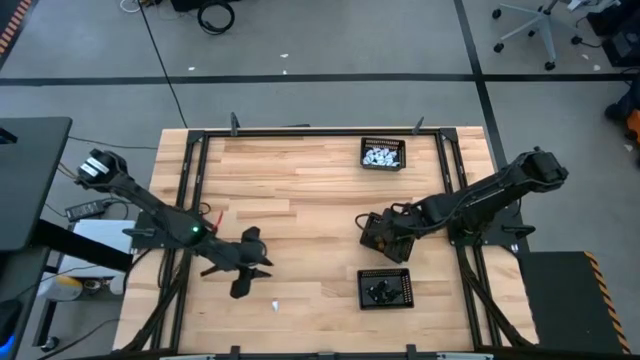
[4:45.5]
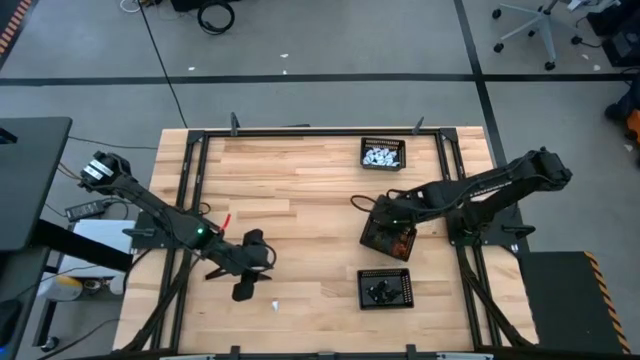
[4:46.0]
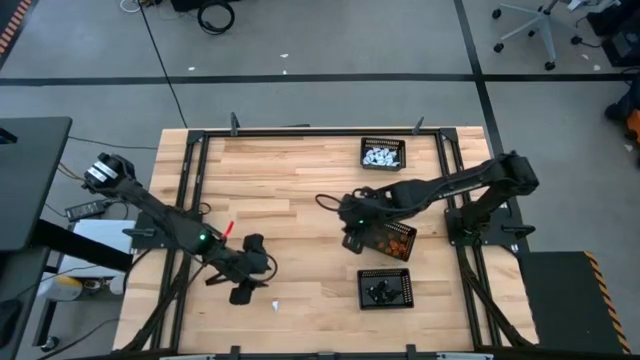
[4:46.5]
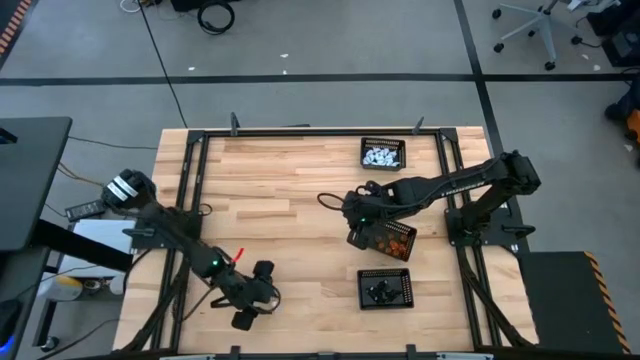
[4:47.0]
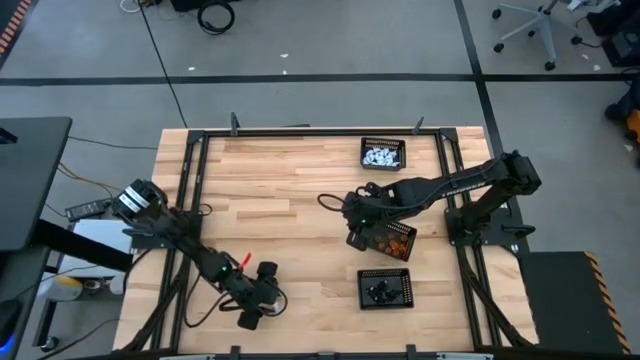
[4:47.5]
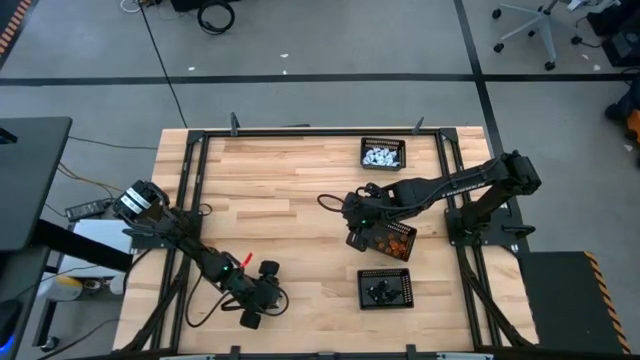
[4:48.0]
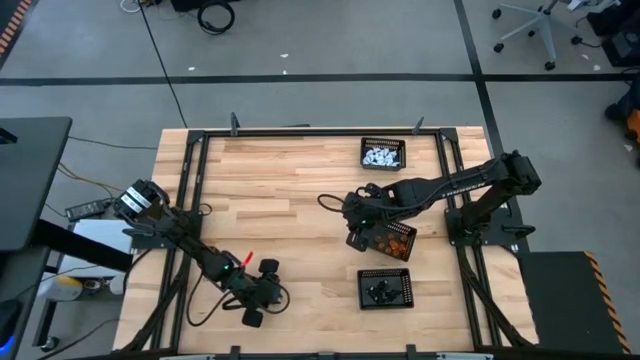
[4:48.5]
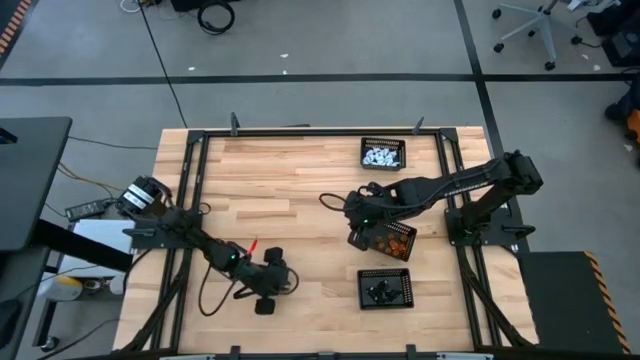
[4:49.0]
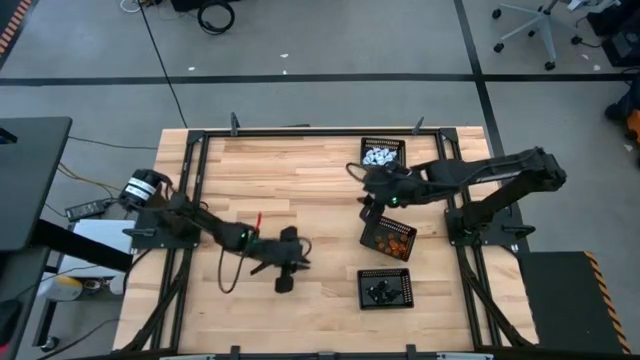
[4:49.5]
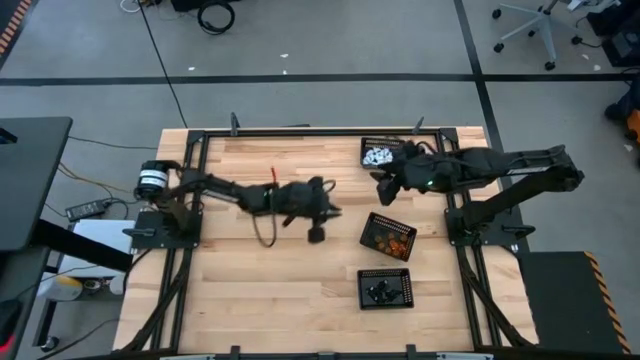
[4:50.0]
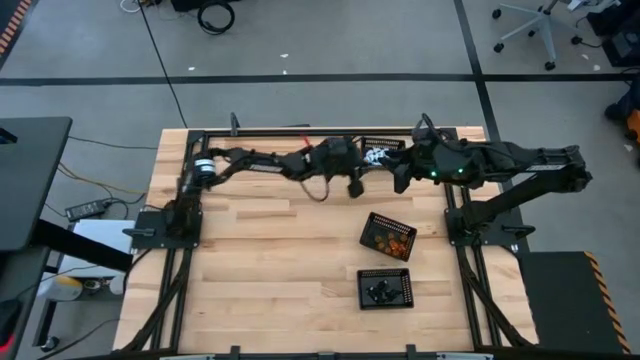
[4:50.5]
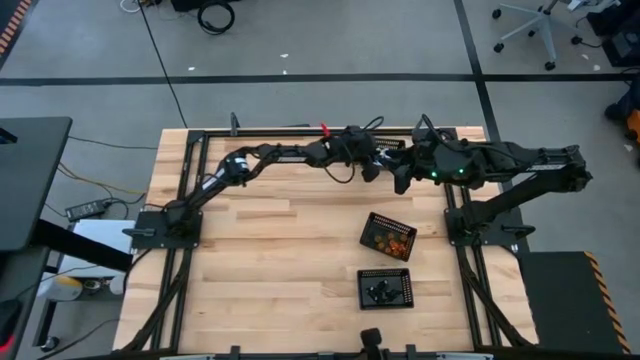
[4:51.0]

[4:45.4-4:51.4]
Task: Sort Halloween decoration
Put the white ghost toy into the top black bin

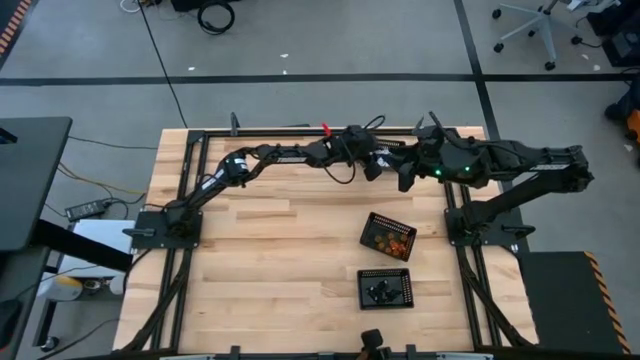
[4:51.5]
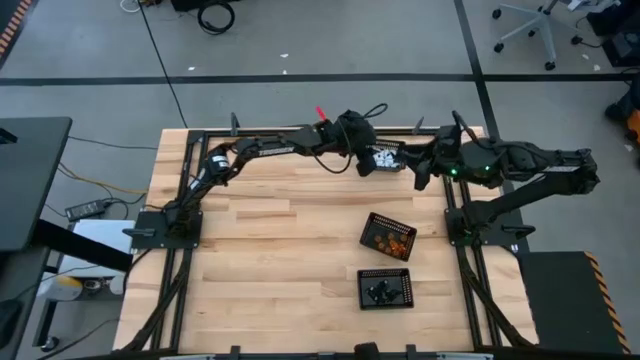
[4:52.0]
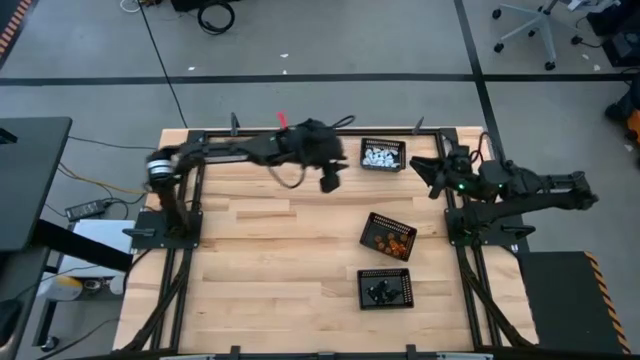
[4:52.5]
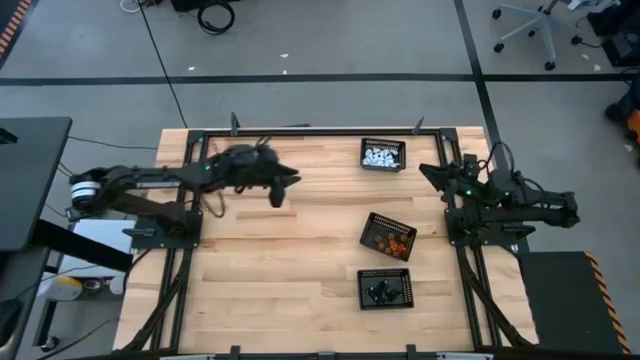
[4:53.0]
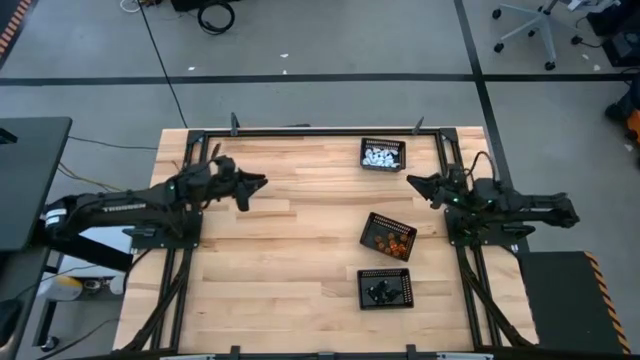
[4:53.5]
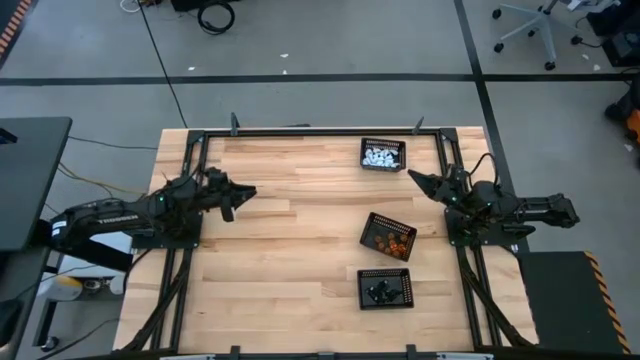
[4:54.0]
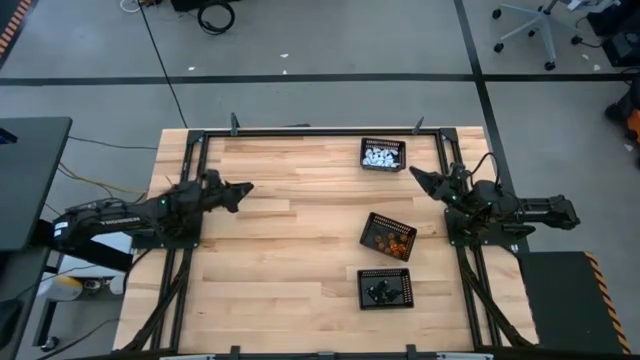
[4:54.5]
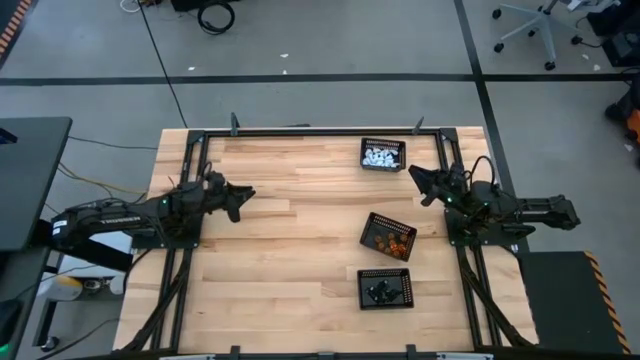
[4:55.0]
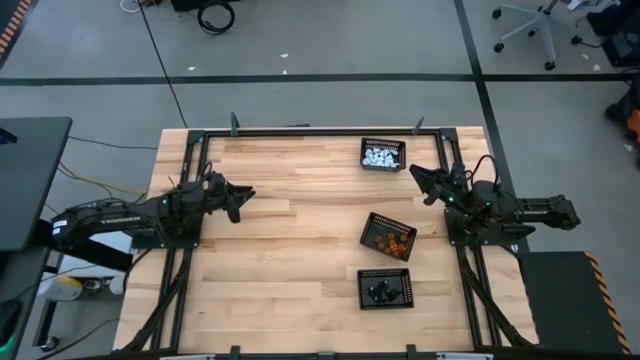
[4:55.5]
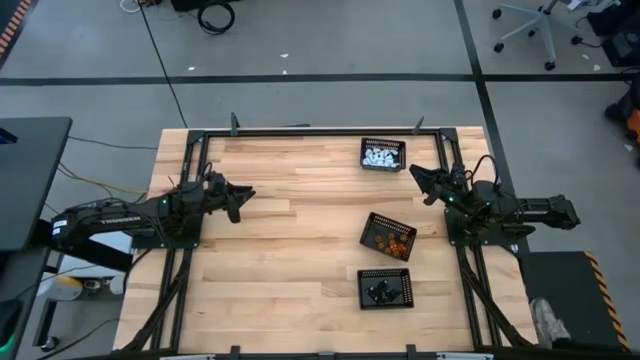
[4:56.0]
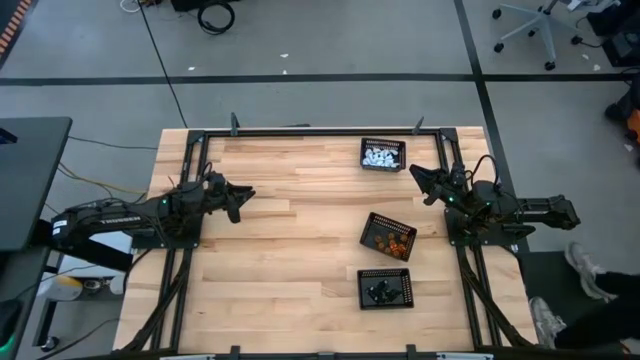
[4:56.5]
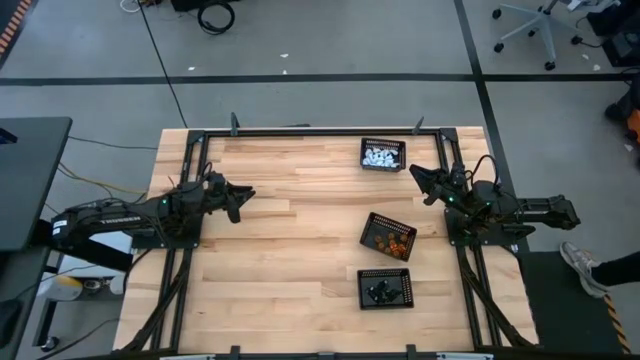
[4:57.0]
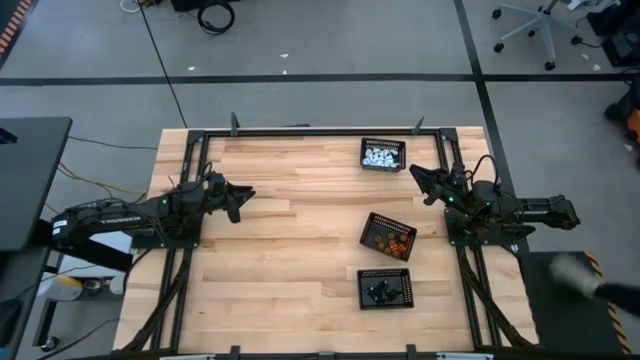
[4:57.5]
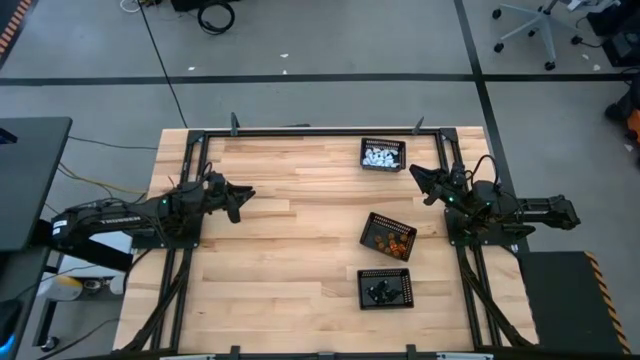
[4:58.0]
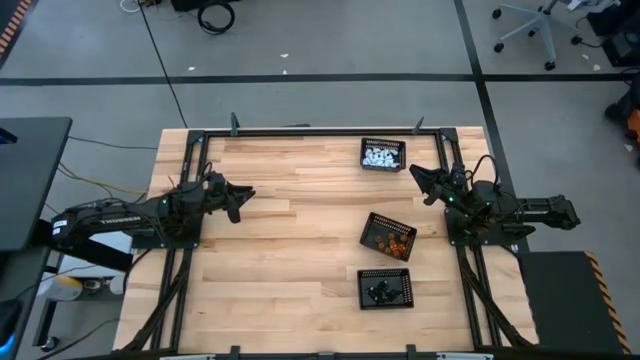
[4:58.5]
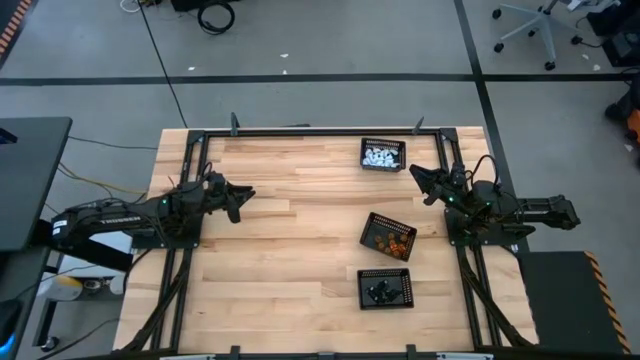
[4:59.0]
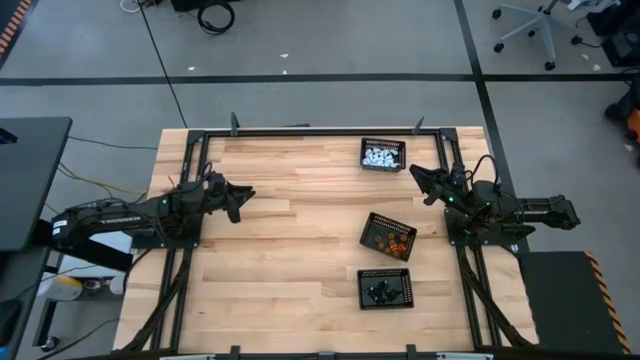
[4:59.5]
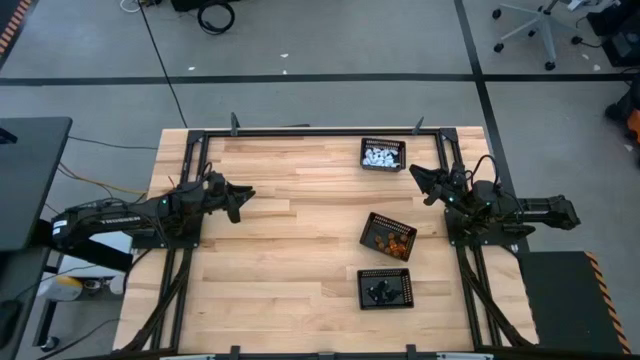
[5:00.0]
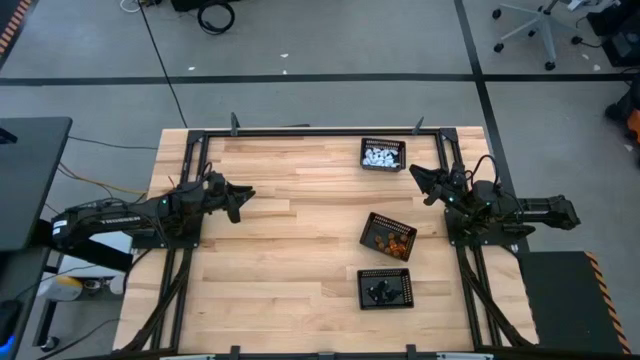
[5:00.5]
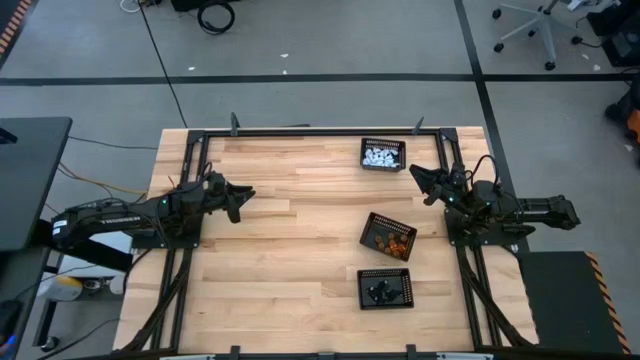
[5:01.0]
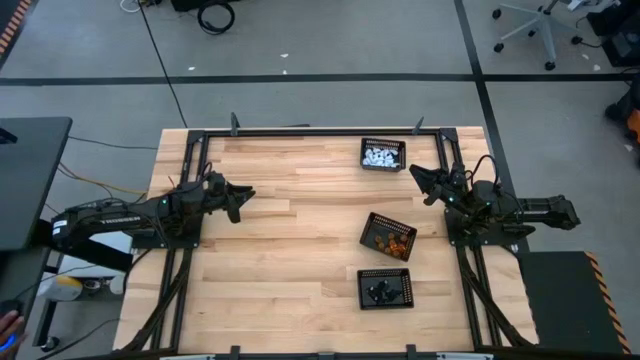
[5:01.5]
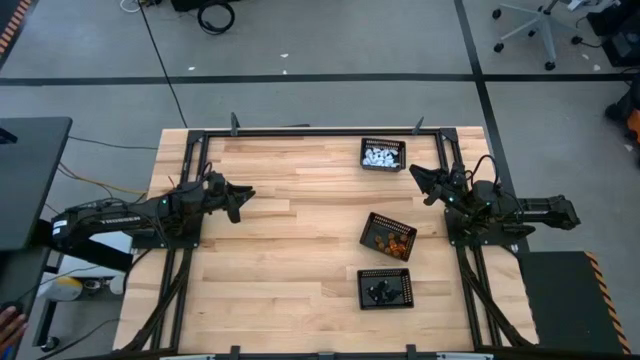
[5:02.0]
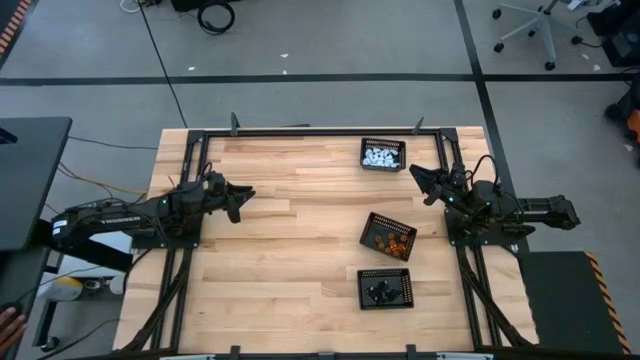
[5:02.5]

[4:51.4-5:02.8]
Return to Home Position

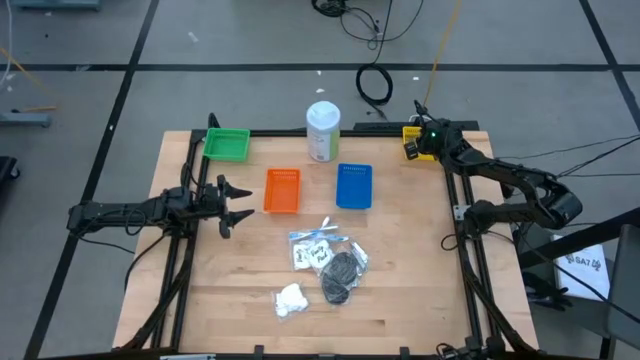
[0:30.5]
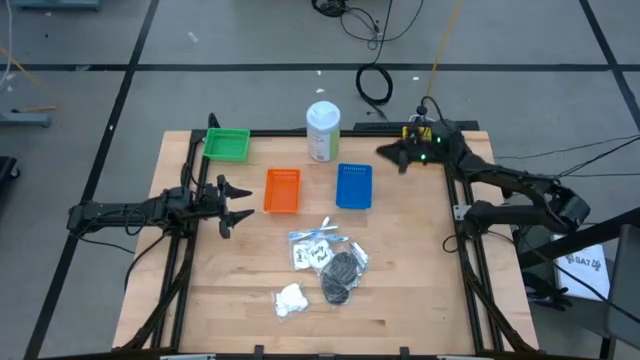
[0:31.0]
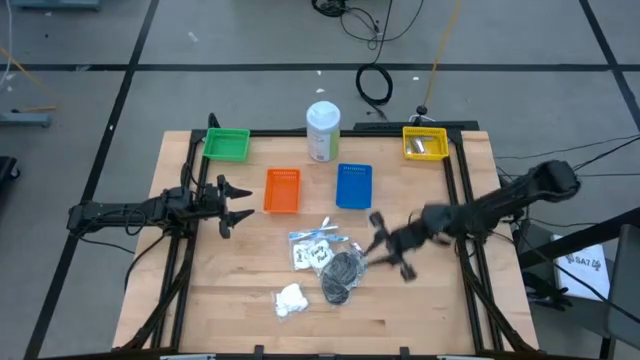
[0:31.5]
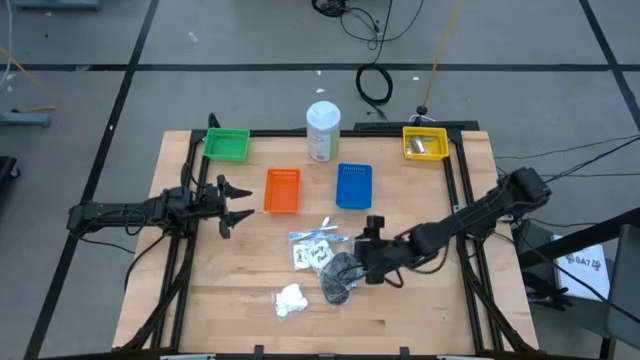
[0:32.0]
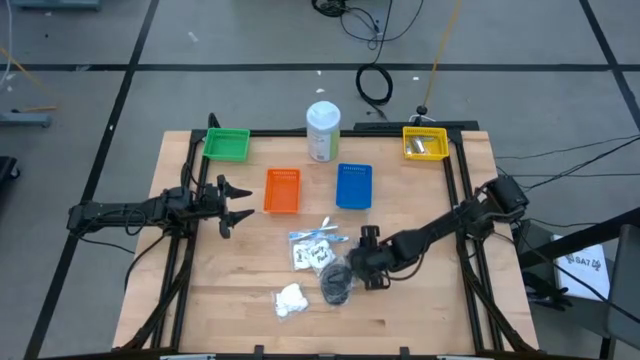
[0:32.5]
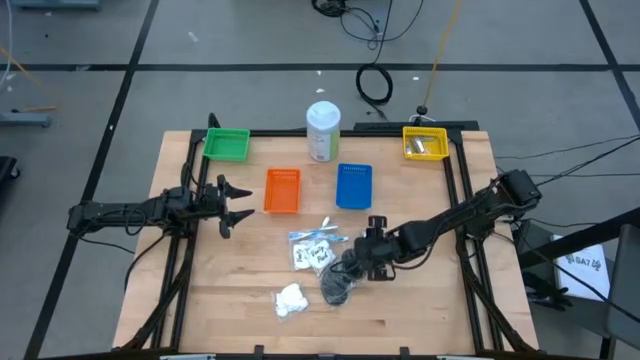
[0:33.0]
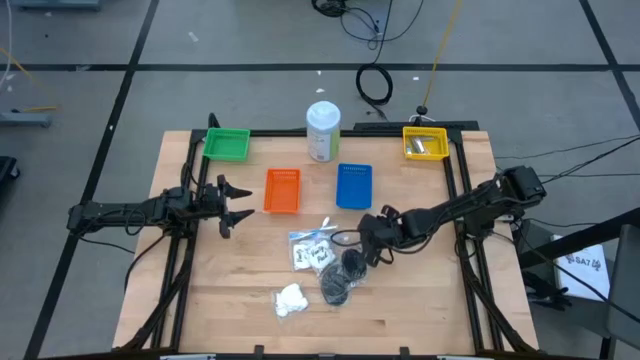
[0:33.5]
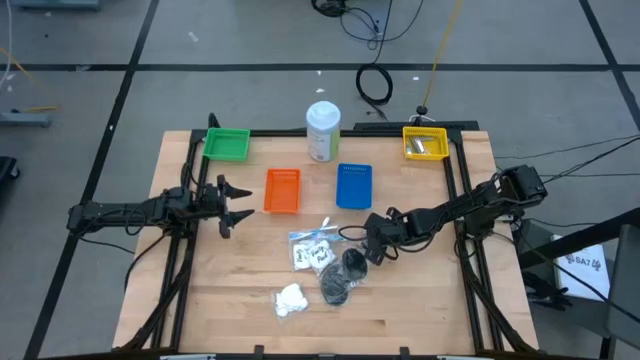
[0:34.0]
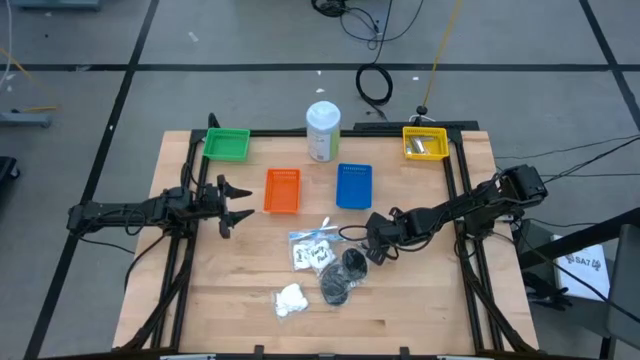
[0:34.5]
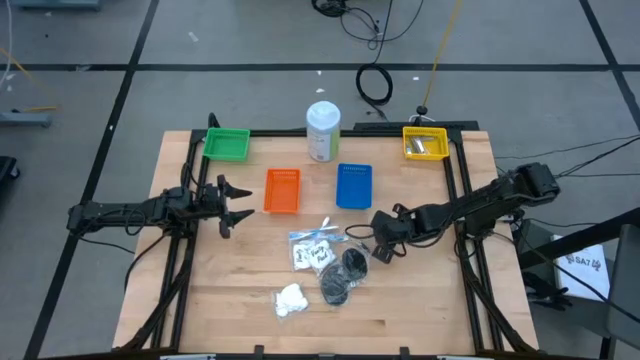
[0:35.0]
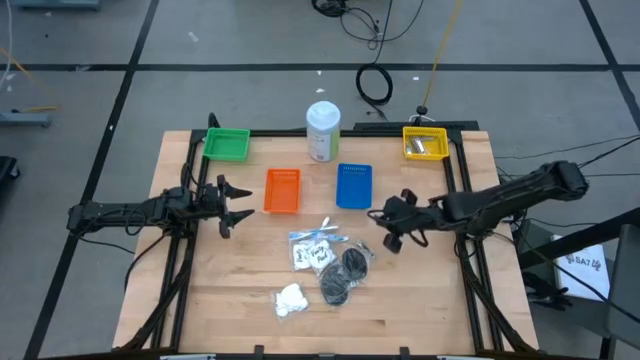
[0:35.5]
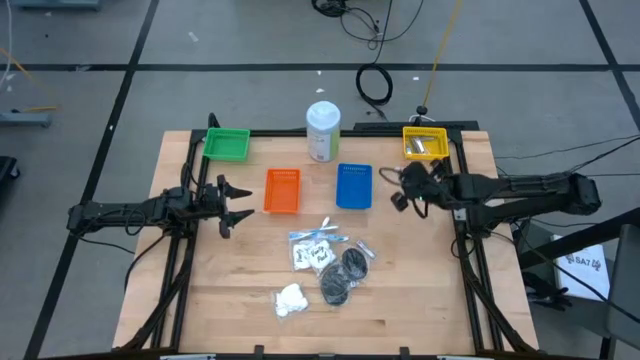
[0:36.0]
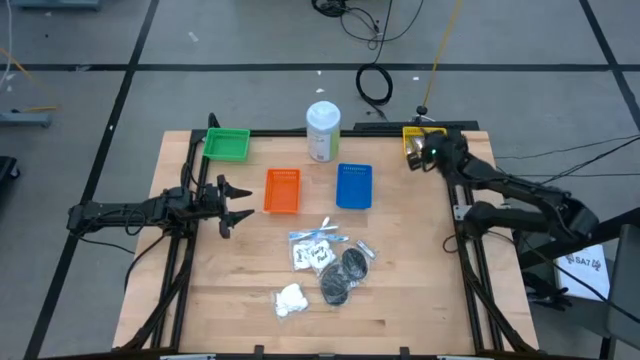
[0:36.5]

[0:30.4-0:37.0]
Task: Pick & Place Travel size toiletries
Put the nail cutter into the yellow bin
